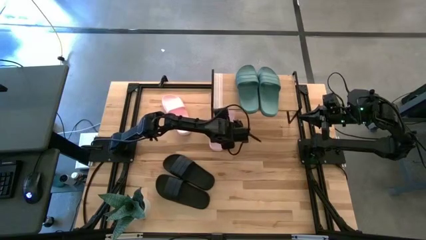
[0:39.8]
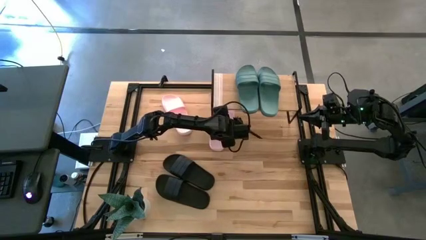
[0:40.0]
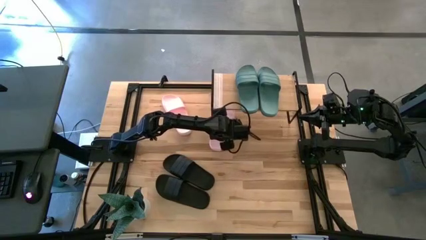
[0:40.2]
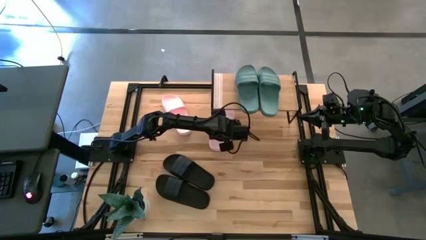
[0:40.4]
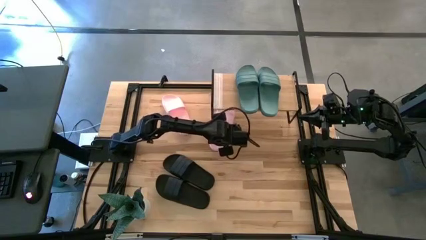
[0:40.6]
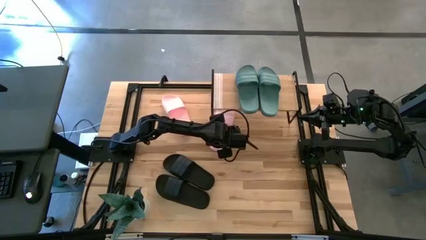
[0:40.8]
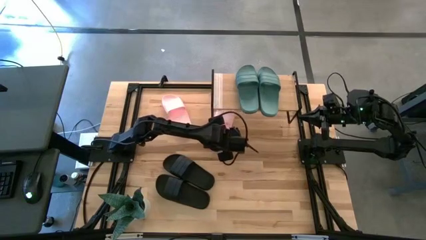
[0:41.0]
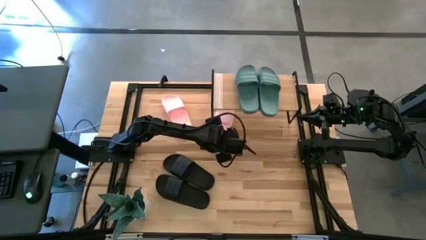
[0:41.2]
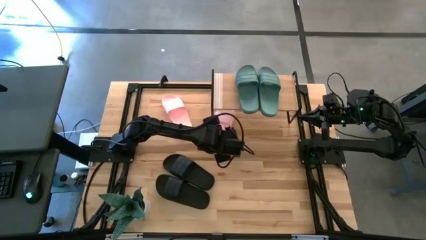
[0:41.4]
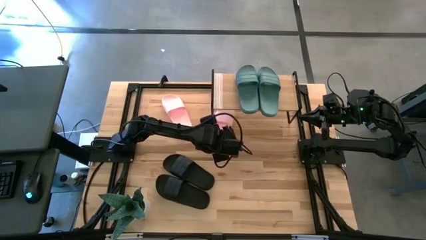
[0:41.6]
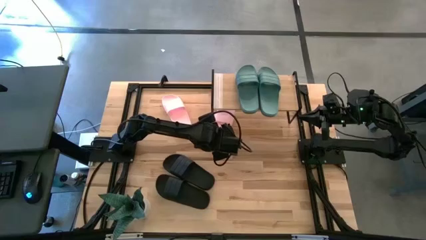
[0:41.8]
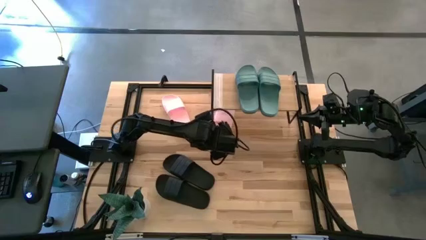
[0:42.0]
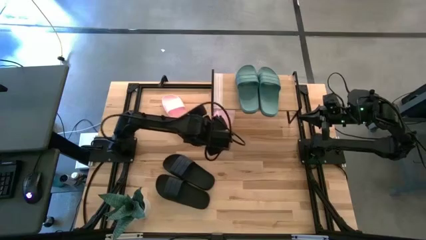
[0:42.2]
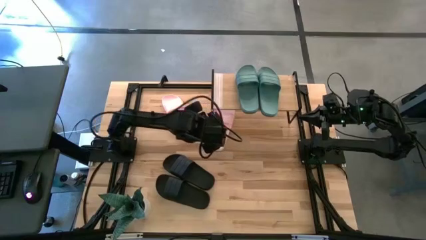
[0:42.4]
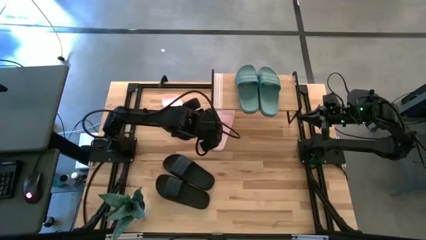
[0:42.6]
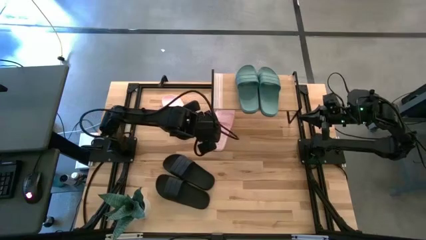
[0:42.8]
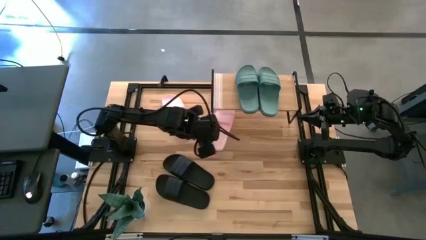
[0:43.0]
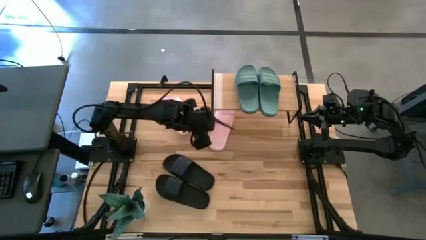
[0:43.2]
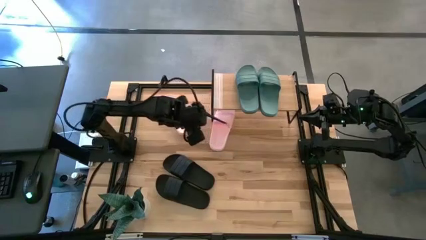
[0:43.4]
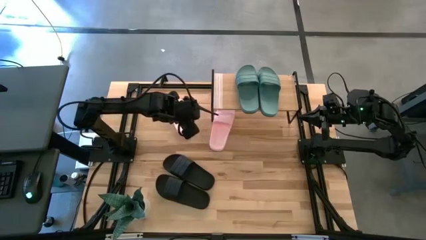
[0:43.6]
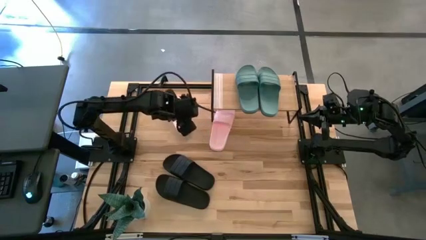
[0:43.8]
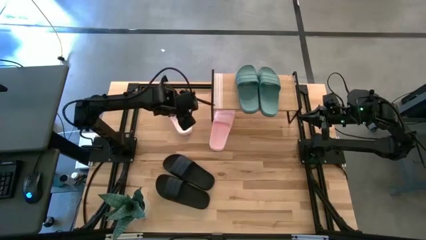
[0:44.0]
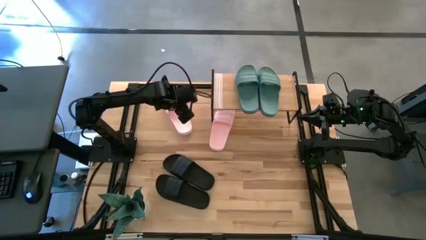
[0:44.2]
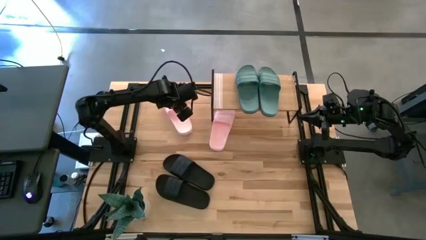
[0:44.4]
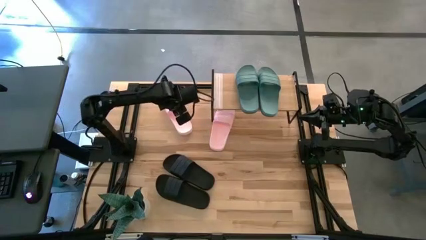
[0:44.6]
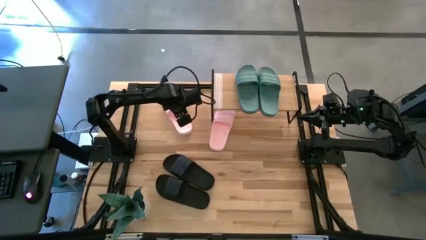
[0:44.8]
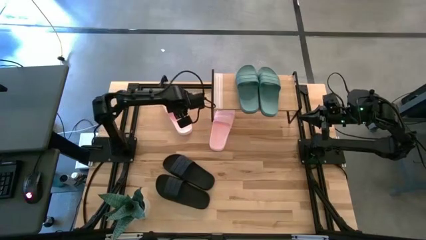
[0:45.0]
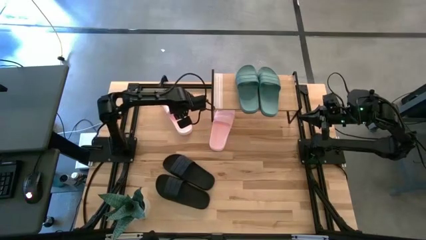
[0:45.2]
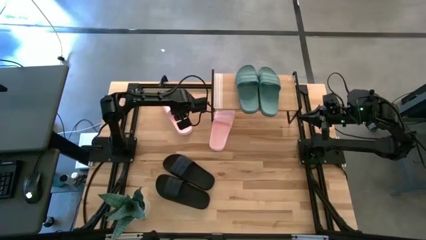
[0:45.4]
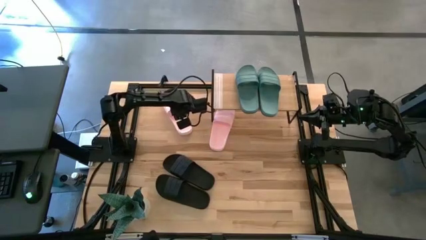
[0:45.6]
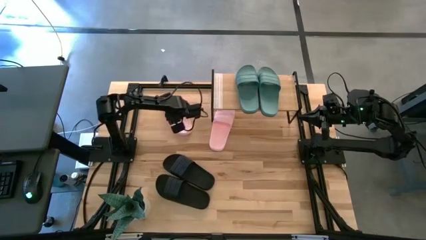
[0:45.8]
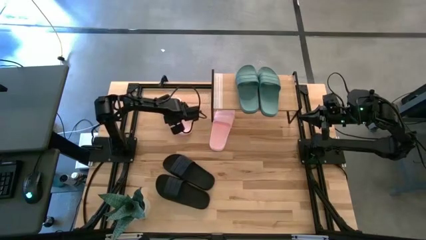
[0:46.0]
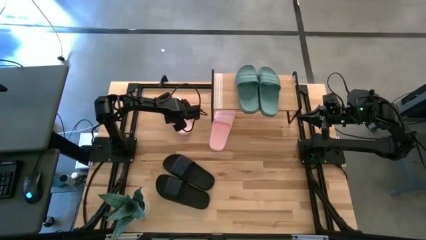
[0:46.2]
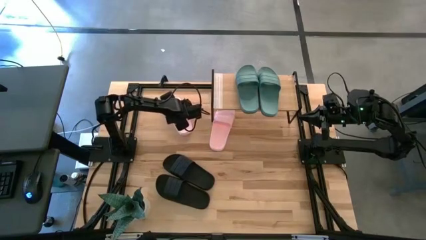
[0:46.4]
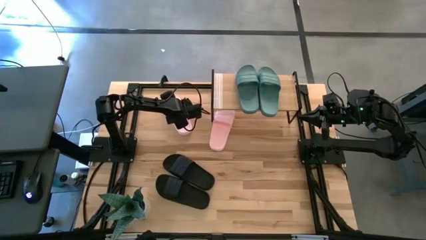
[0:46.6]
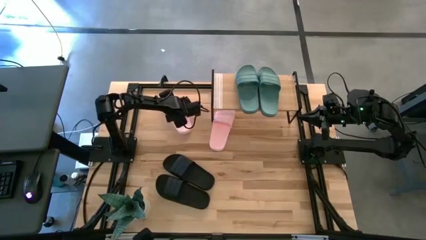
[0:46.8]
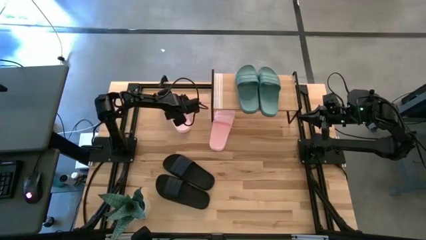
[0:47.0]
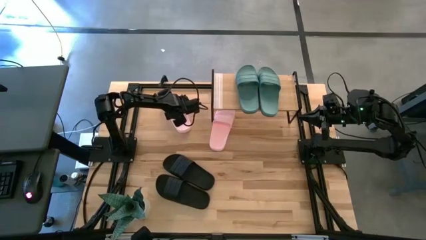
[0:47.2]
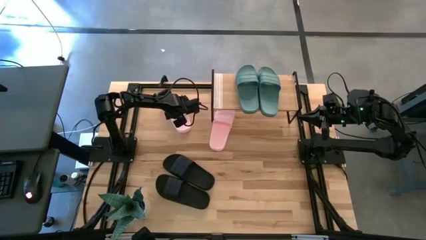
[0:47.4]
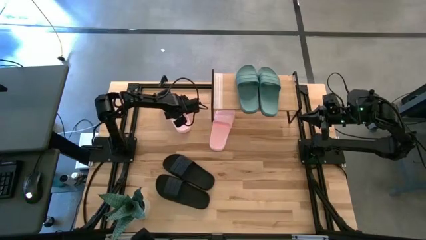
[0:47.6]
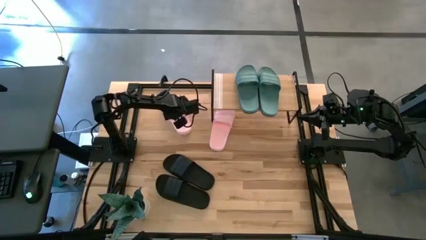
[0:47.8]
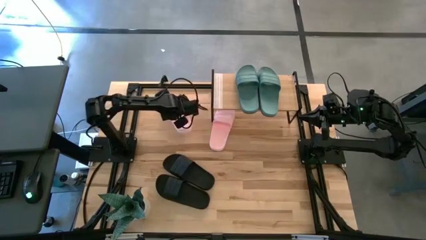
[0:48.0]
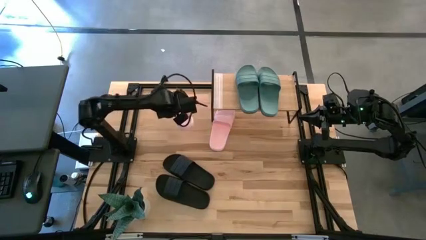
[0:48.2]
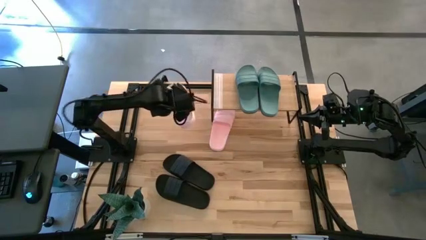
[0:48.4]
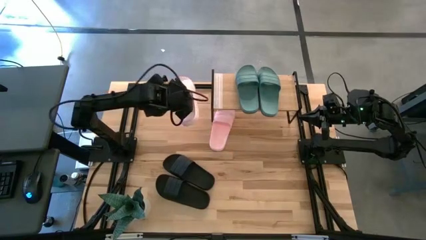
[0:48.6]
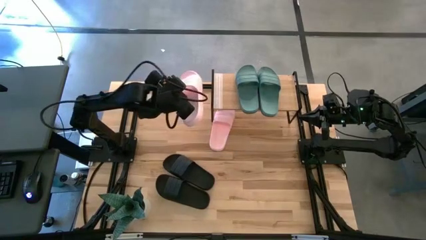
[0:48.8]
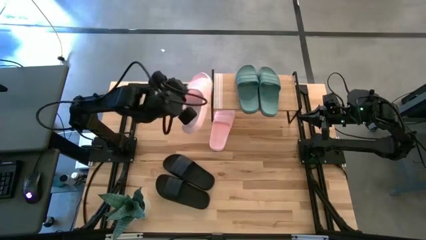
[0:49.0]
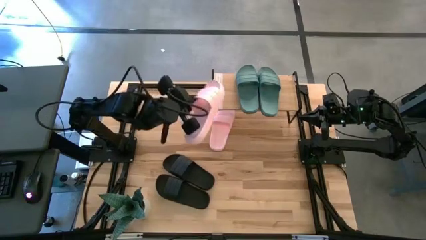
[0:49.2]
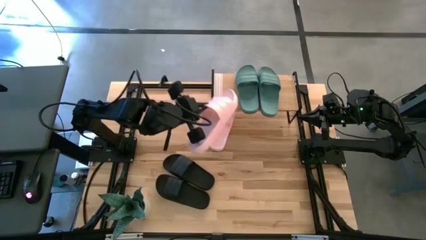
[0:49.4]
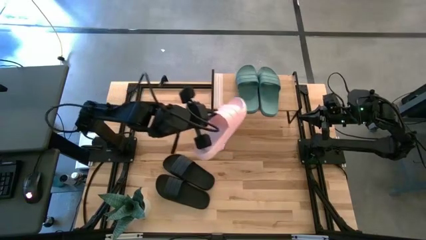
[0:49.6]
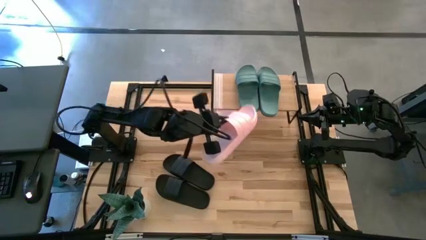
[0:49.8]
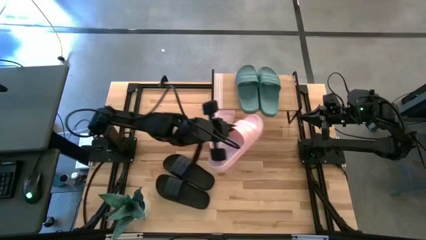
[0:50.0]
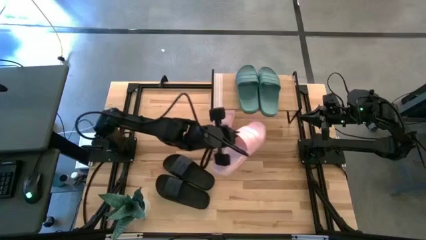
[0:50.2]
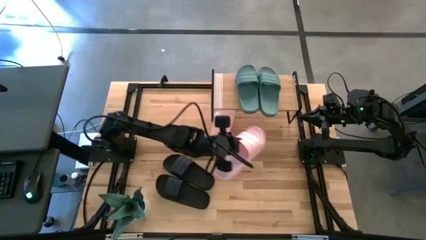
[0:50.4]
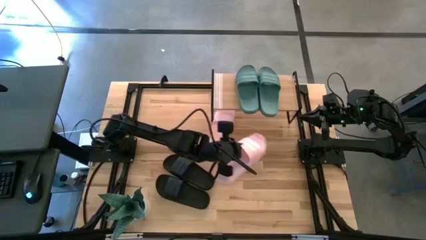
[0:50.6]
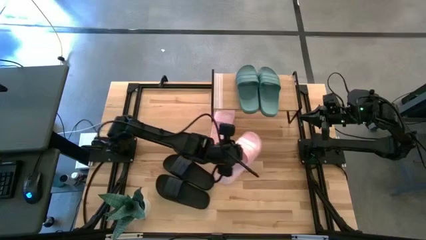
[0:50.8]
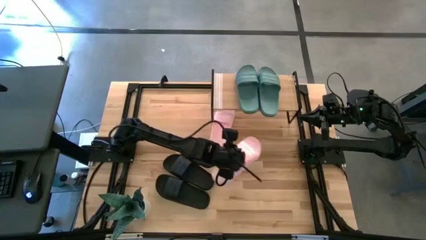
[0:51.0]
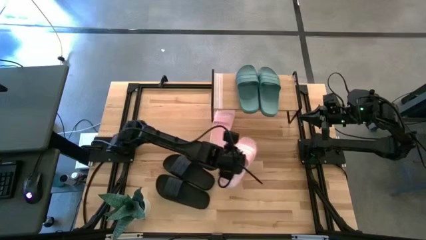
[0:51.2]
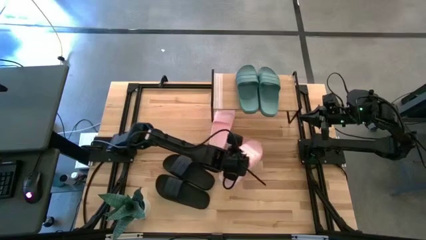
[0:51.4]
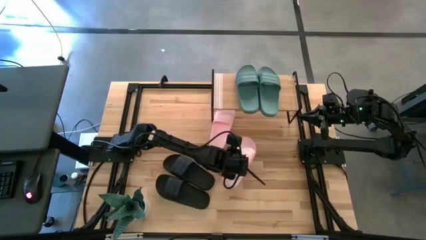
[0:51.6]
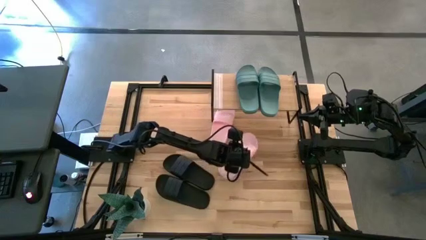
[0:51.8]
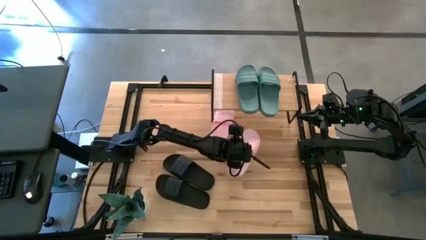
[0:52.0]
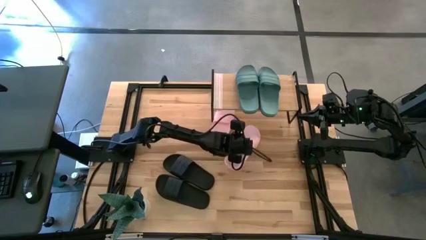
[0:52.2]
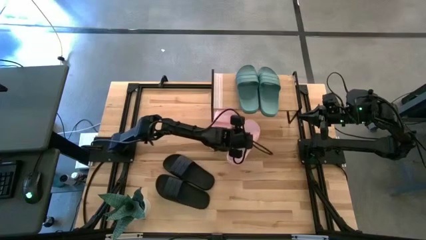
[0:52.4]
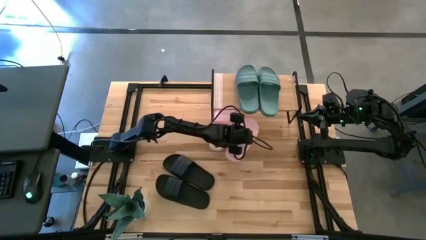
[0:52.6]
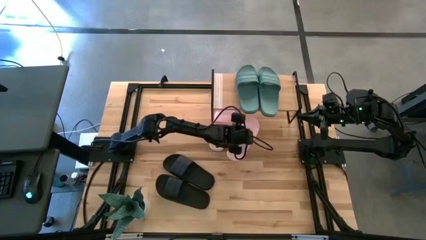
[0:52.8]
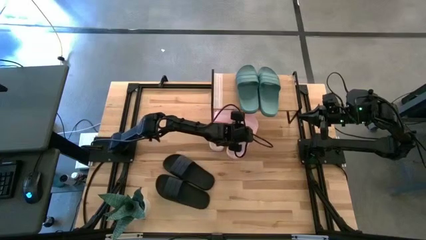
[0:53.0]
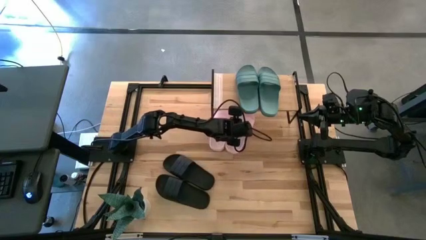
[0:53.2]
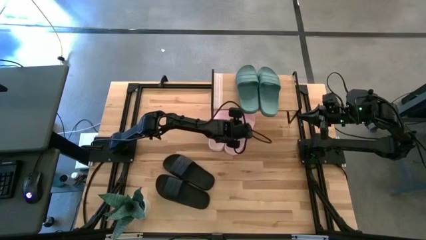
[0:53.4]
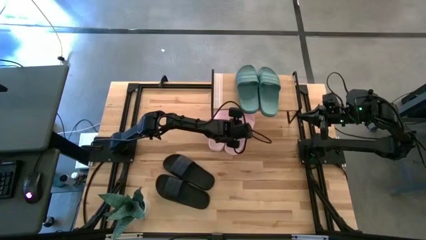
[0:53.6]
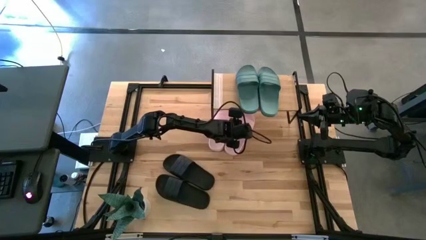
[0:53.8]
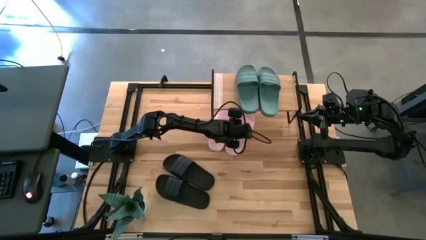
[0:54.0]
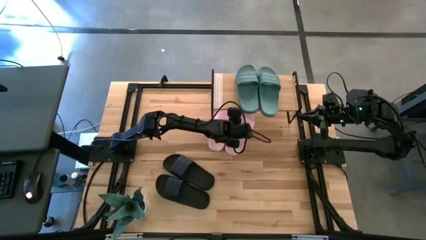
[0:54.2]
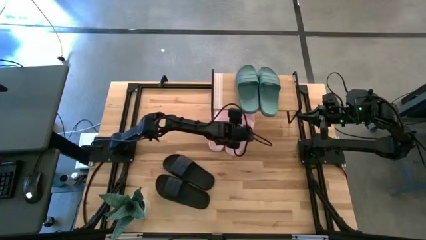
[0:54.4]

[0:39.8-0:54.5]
Task: Pick and place slides into the shelf
Put the pink slide under the shelf
